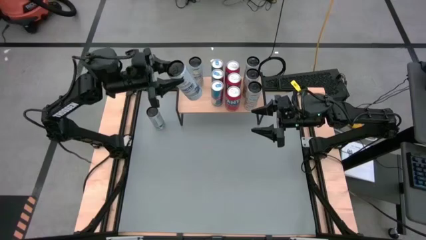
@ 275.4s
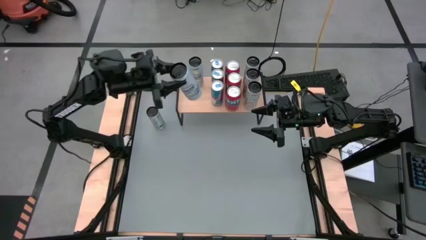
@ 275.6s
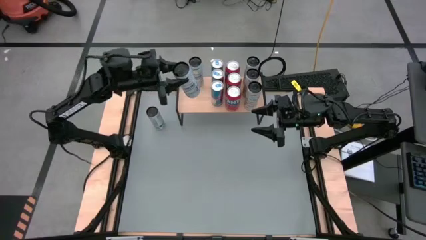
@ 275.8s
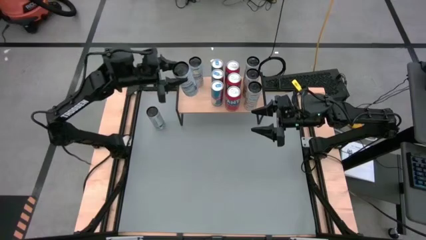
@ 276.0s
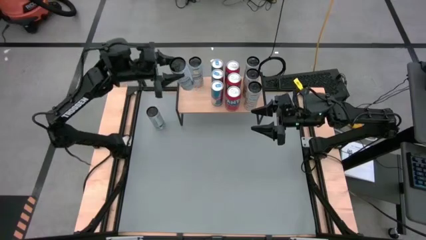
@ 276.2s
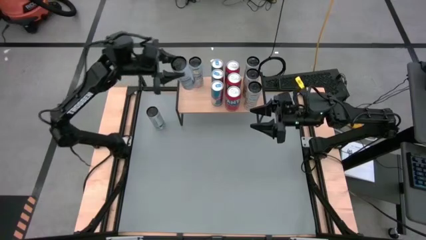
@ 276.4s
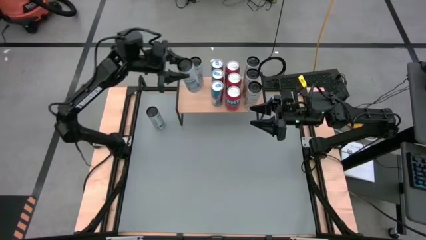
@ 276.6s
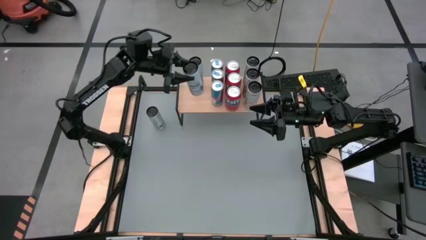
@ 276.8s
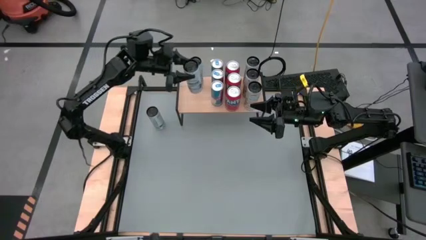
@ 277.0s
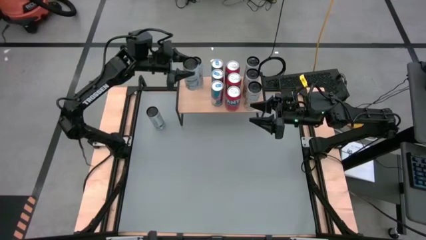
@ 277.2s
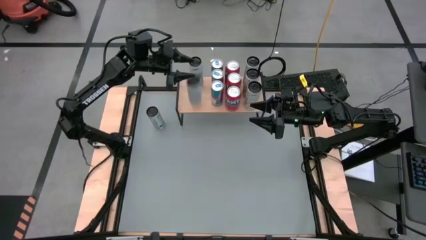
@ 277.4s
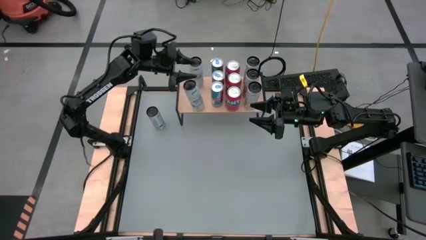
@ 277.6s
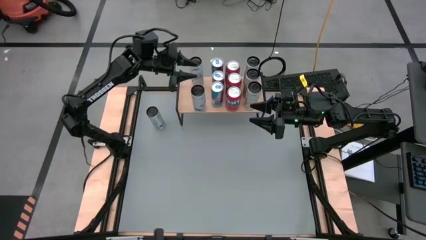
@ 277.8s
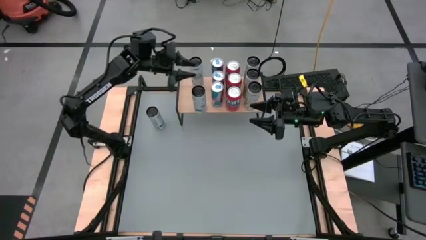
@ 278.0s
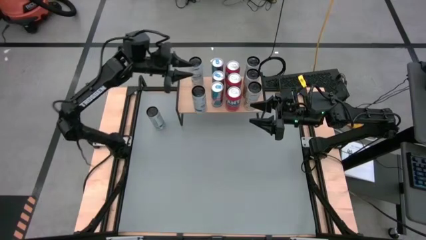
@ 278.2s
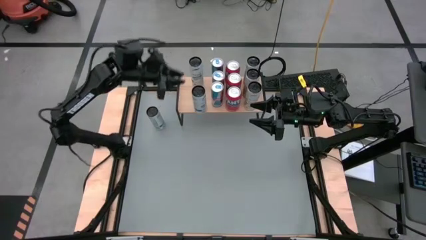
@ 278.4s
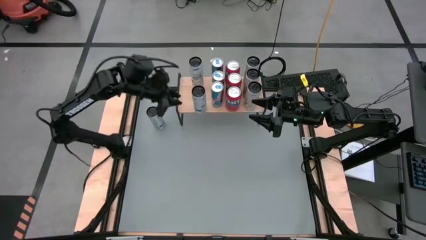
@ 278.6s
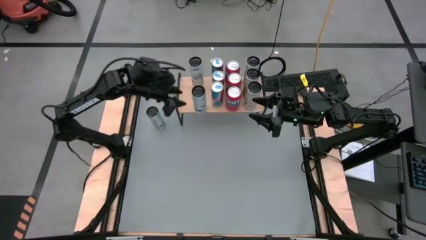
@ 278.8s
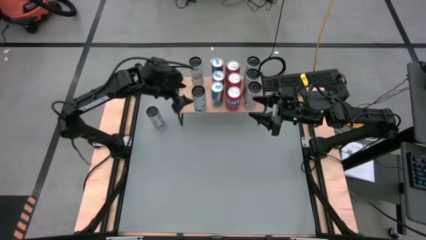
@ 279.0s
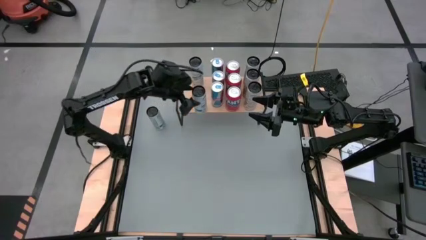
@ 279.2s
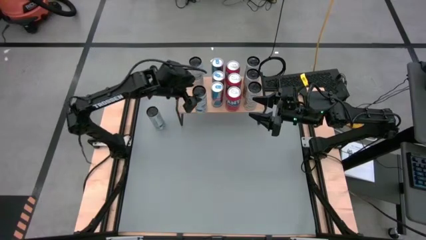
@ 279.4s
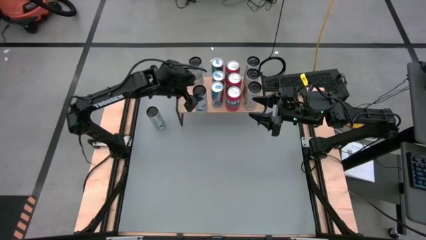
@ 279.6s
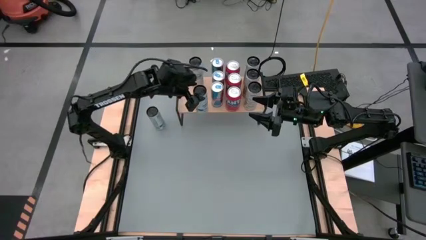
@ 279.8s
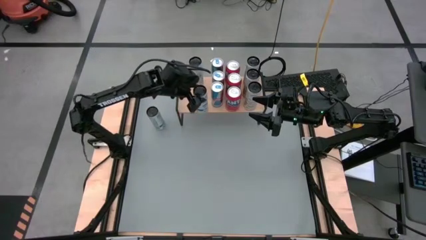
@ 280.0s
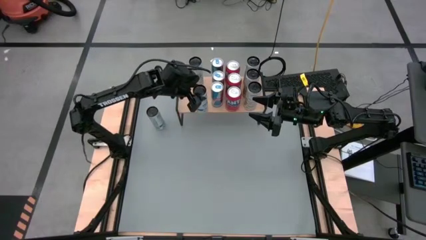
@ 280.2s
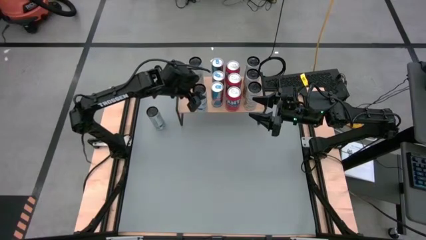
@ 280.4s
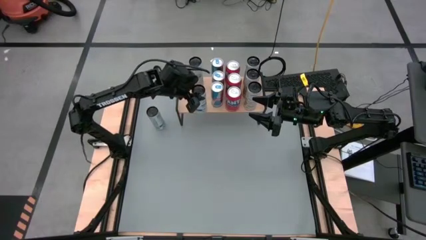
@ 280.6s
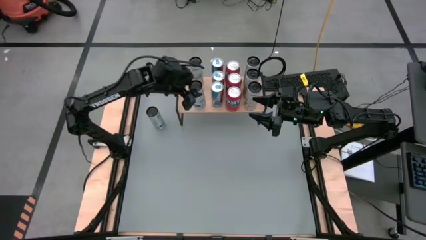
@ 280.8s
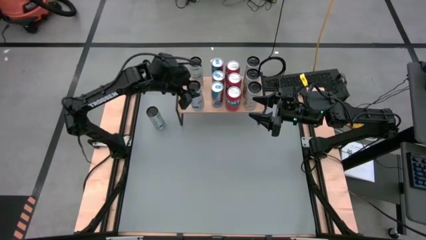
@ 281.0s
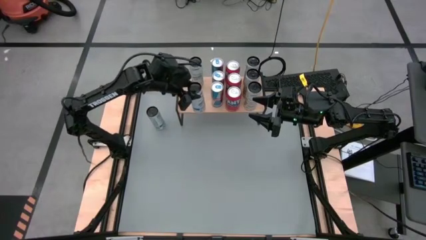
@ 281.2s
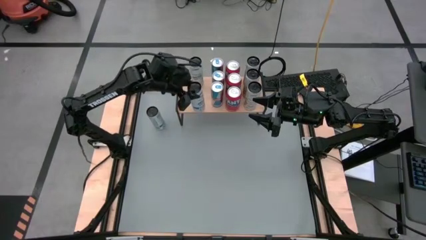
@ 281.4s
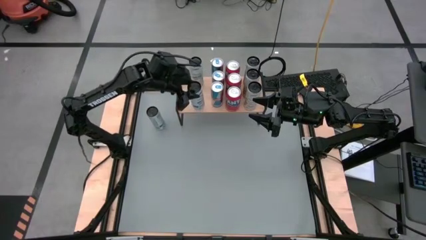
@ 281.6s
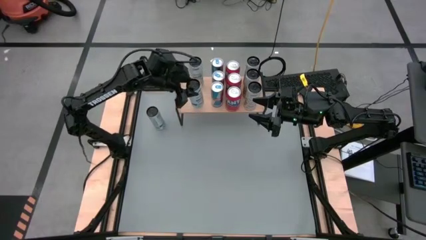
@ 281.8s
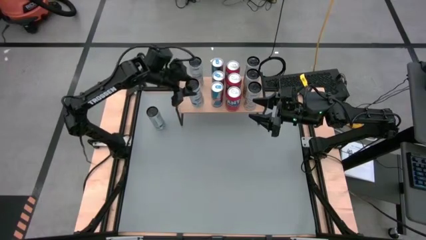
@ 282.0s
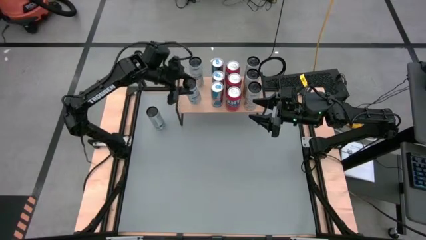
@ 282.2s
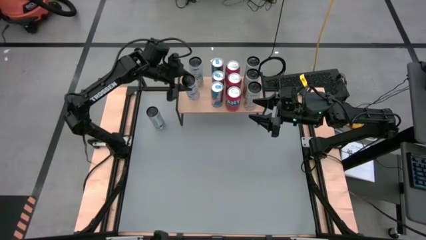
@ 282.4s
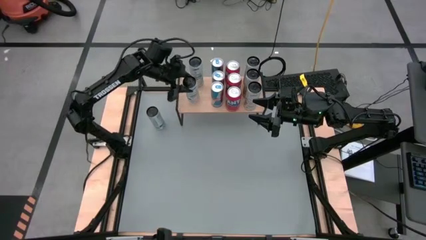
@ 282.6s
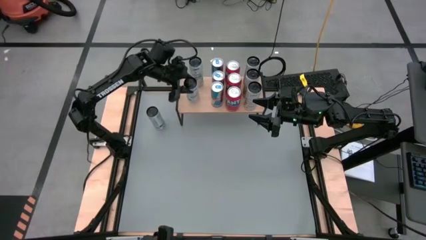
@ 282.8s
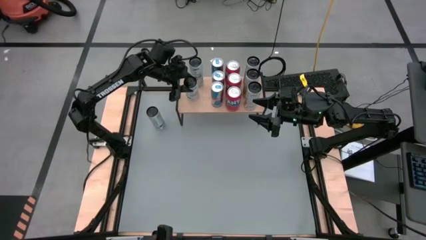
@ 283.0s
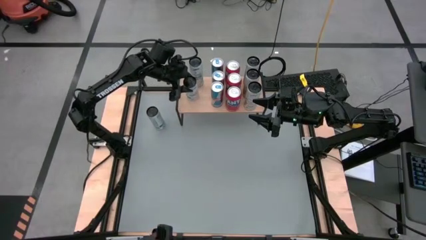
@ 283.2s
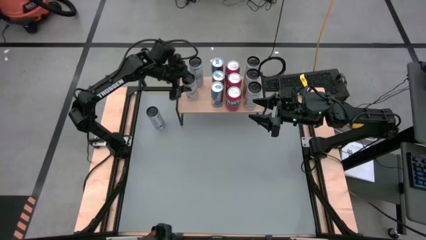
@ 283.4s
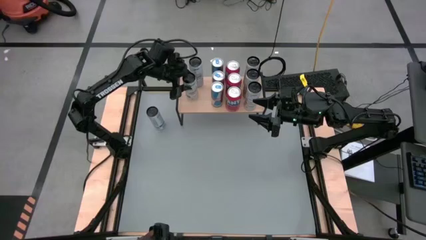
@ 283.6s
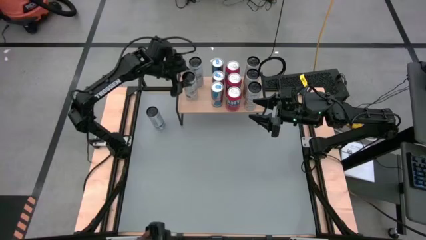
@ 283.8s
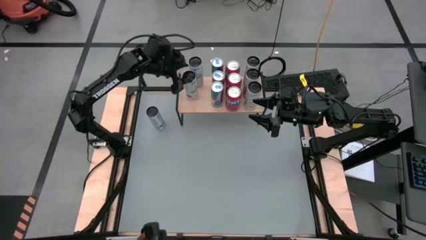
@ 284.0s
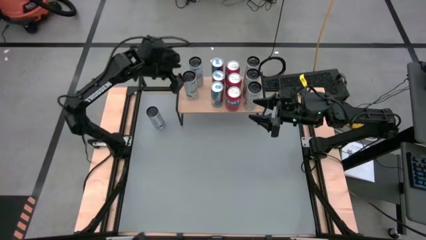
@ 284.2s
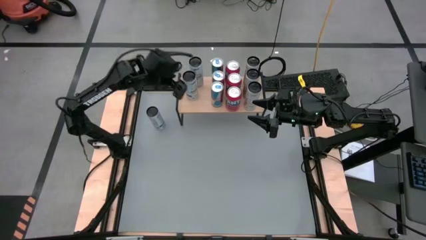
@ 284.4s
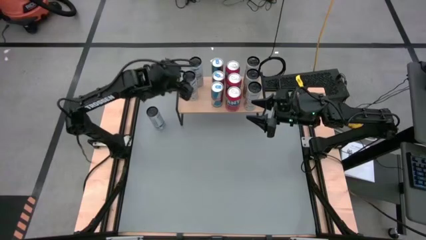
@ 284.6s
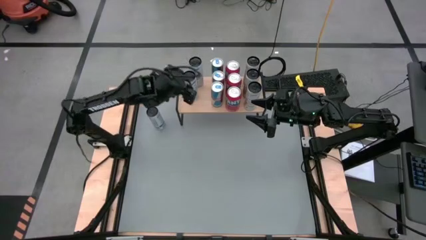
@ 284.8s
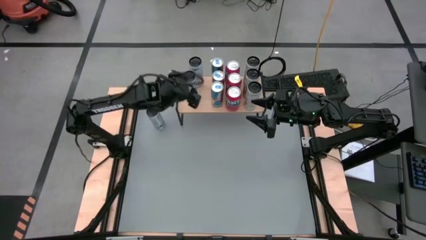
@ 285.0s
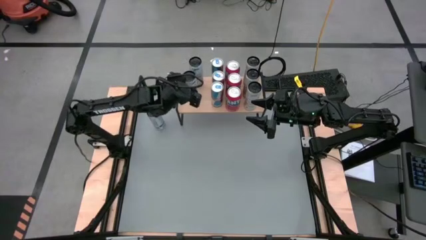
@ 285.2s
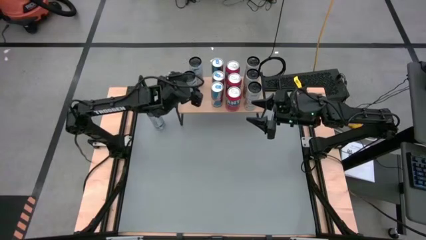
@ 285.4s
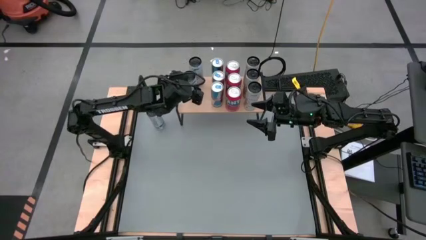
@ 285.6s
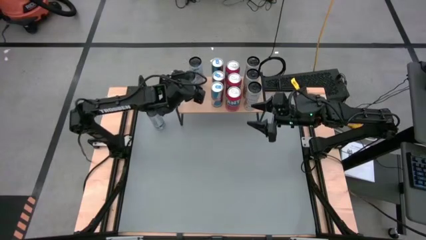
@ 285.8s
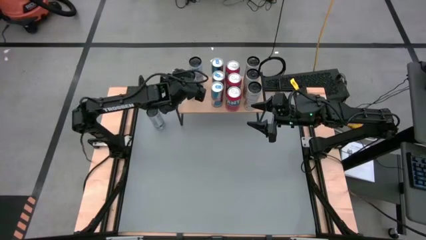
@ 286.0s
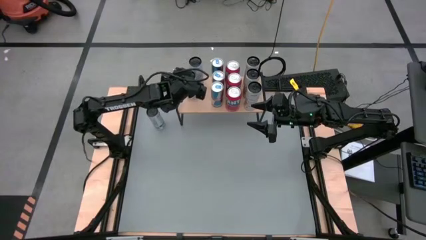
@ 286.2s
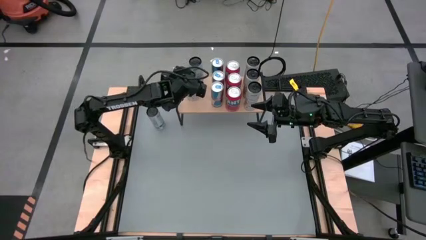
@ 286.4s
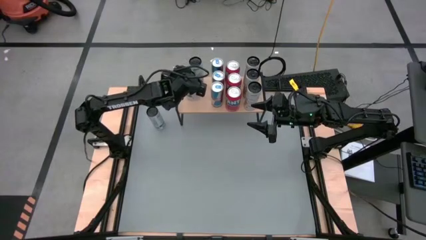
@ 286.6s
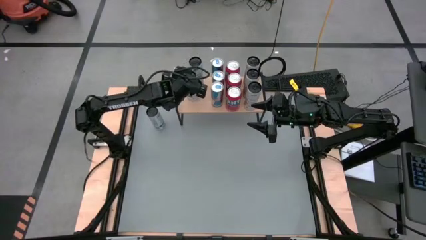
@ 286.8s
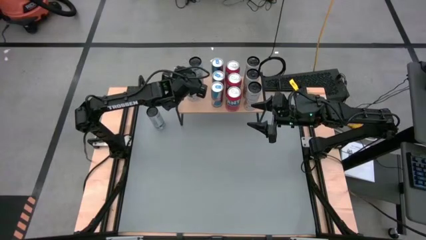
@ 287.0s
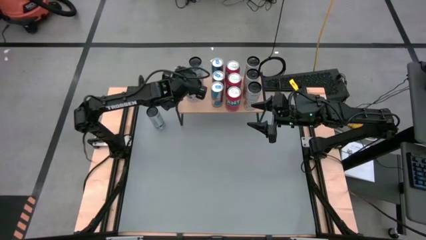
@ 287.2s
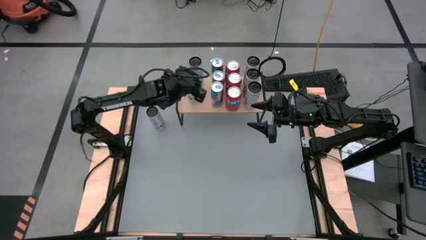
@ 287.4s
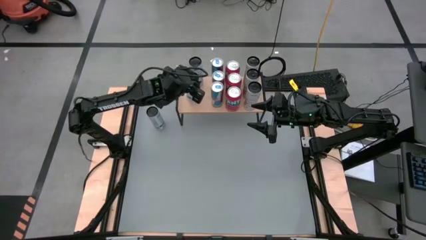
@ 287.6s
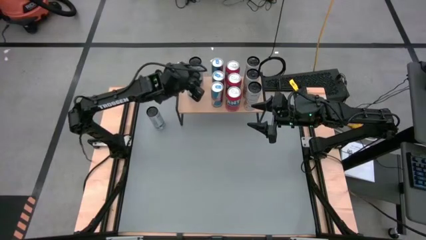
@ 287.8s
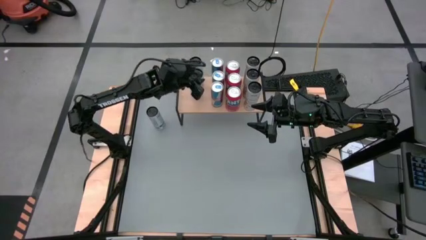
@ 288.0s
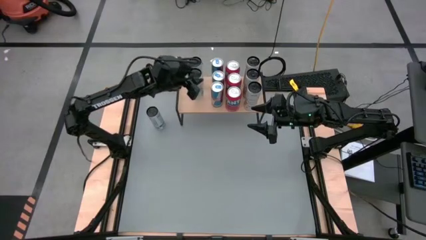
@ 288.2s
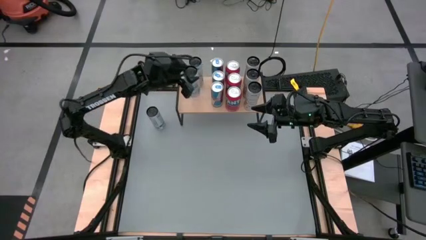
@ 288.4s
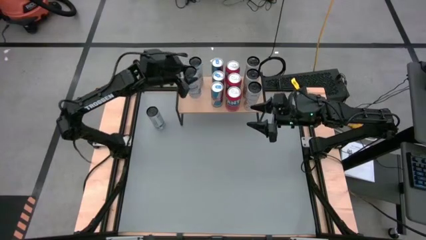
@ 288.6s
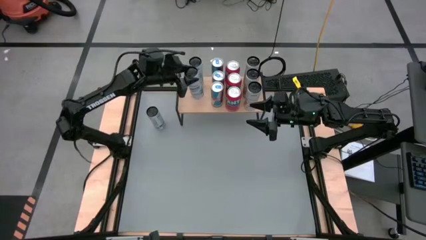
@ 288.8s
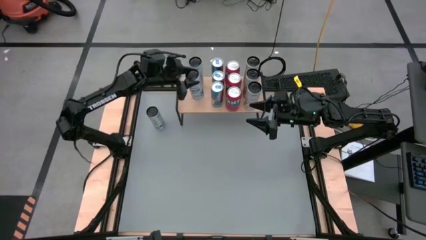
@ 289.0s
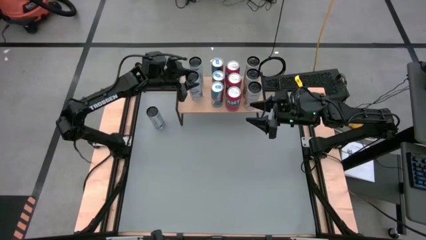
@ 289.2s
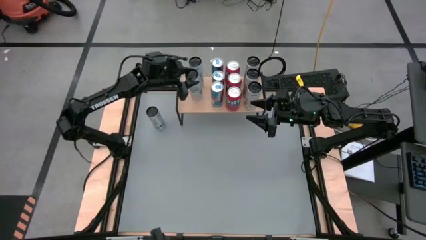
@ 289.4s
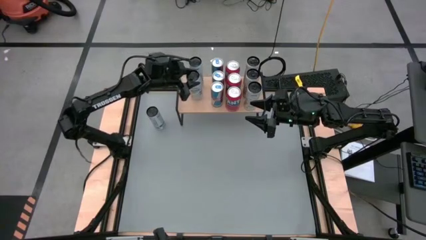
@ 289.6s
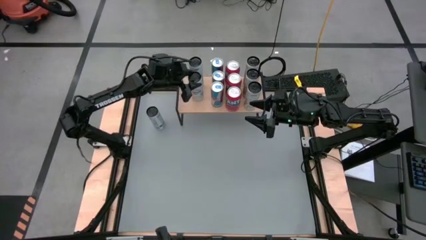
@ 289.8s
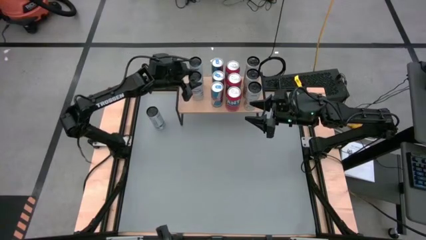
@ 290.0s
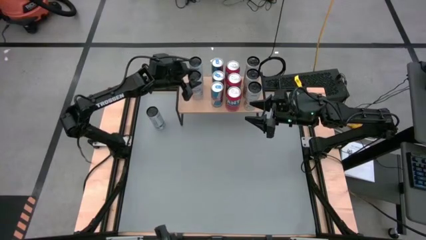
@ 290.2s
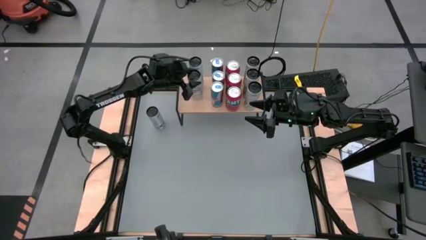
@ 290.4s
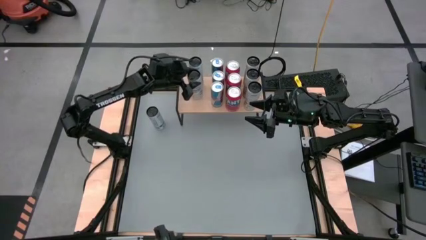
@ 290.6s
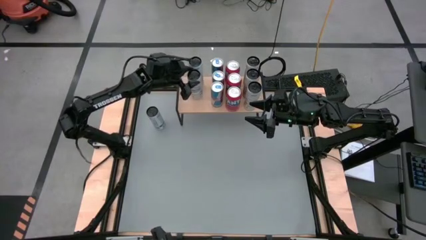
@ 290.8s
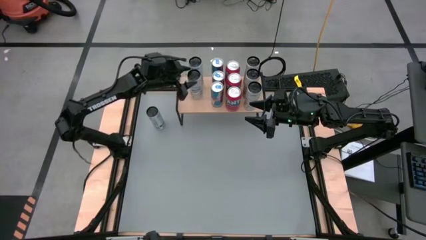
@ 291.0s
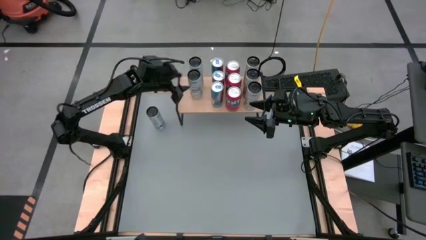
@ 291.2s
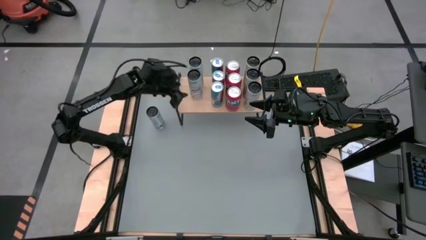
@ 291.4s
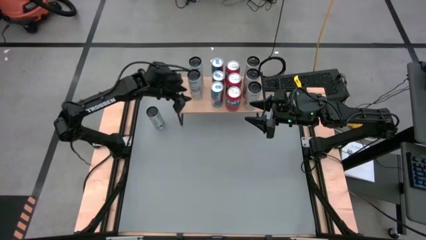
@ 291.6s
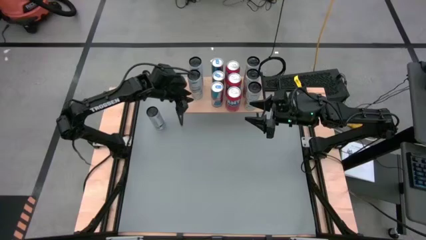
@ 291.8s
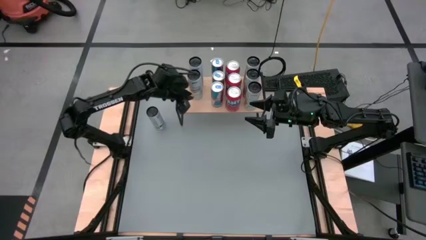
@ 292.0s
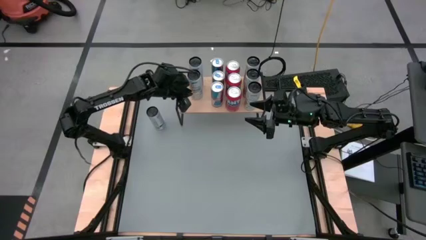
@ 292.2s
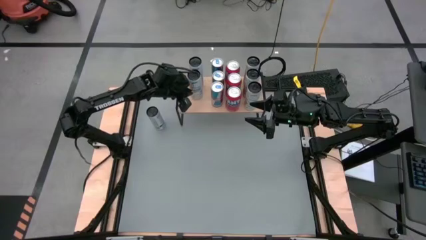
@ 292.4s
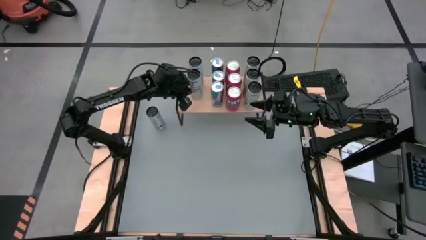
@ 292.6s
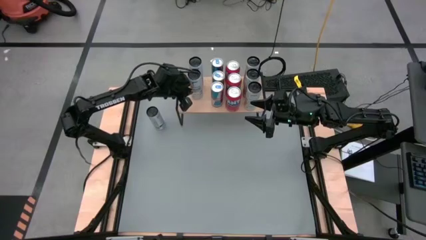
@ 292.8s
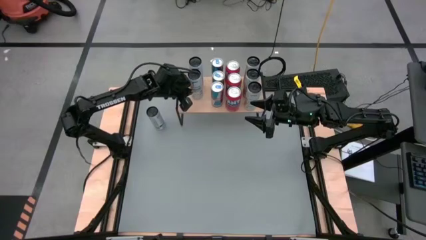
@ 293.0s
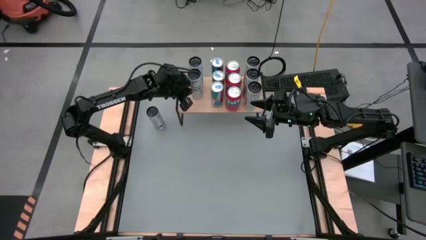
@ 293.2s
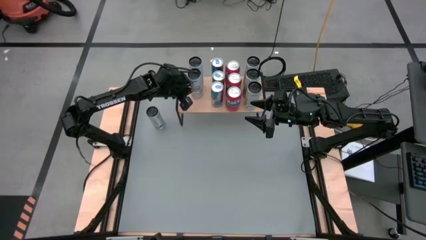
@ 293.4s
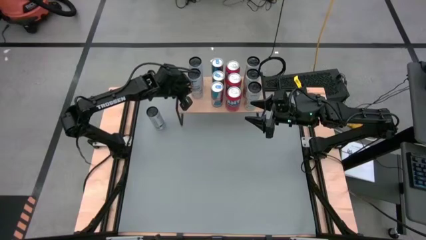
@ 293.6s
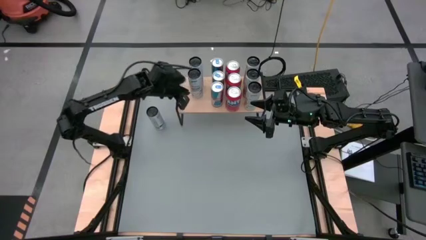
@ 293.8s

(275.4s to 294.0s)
Task: Place canned beverage on shelf
Put the bottom white soda can on the shelf aligned with the other white soda can
